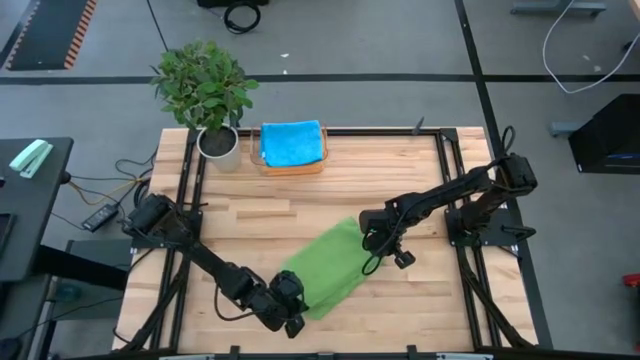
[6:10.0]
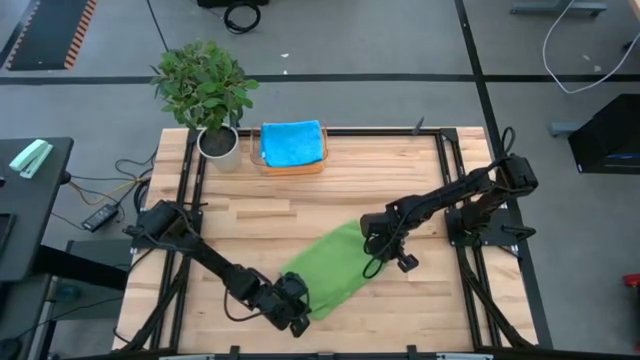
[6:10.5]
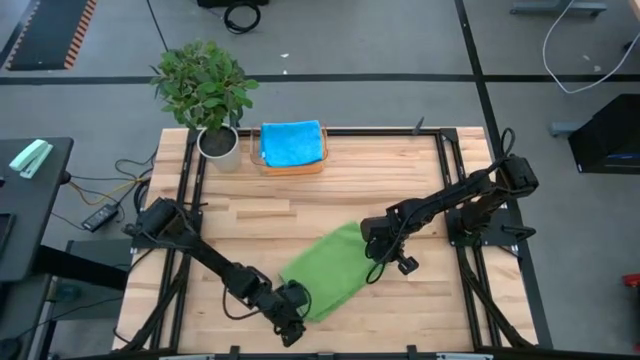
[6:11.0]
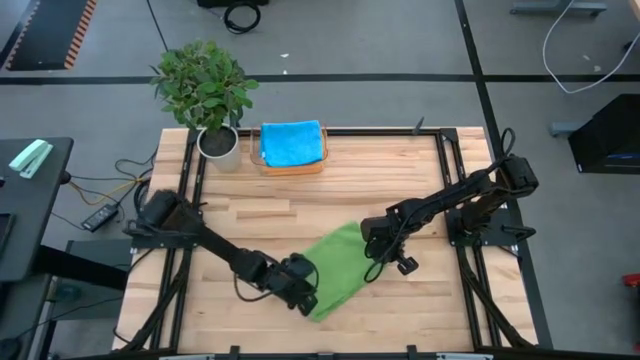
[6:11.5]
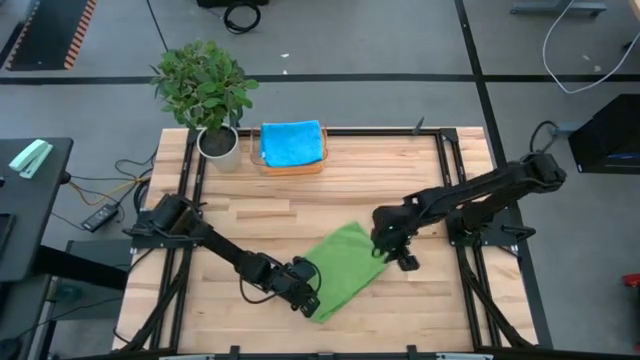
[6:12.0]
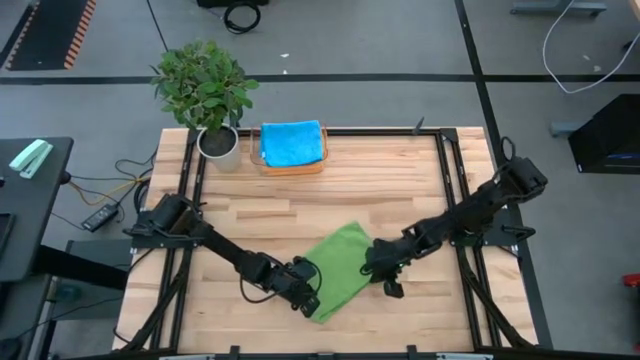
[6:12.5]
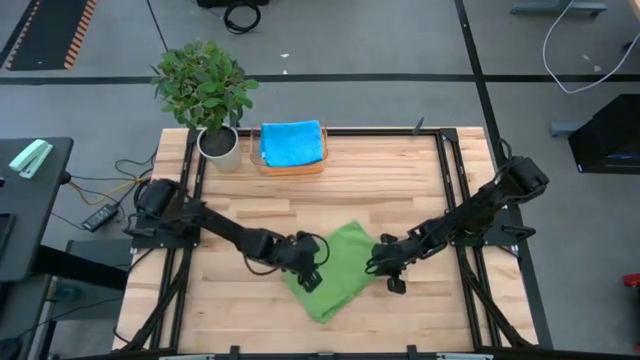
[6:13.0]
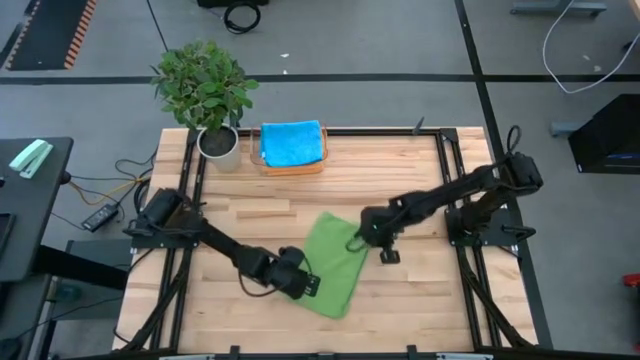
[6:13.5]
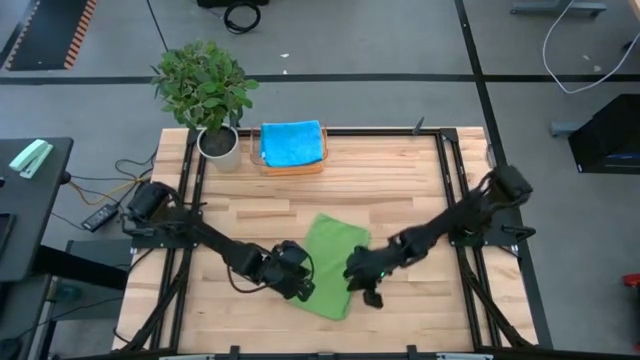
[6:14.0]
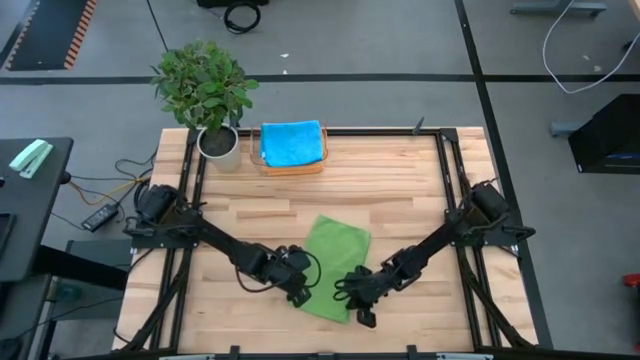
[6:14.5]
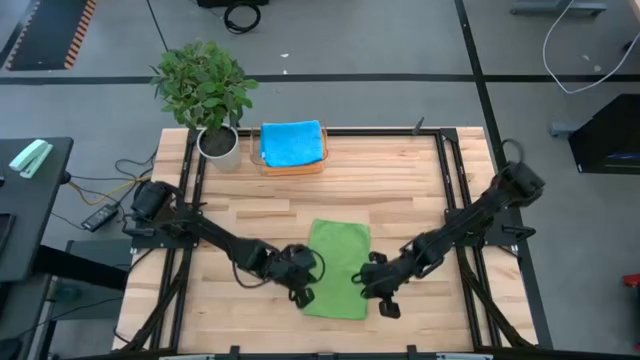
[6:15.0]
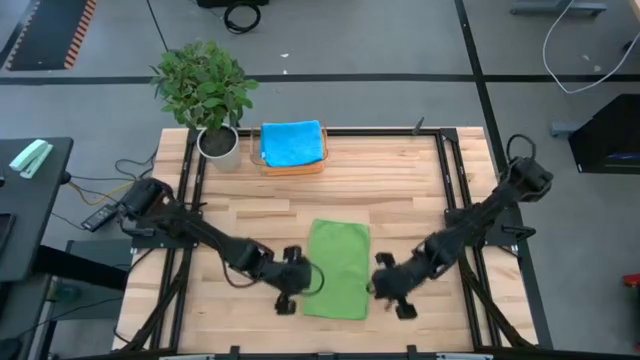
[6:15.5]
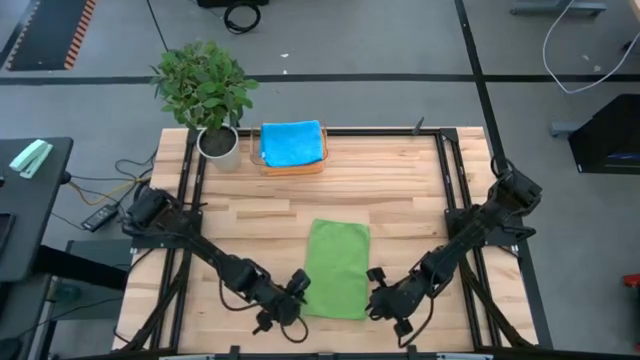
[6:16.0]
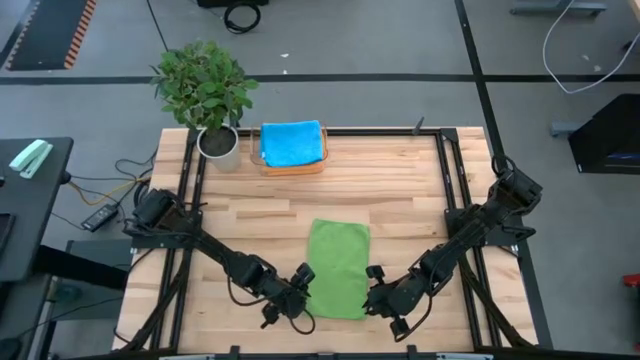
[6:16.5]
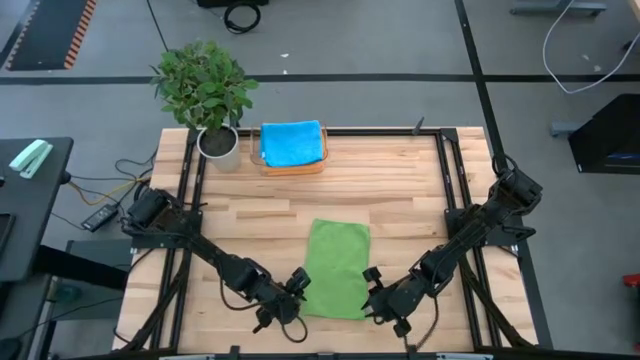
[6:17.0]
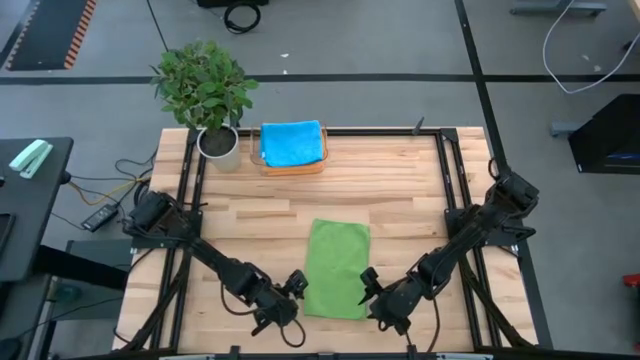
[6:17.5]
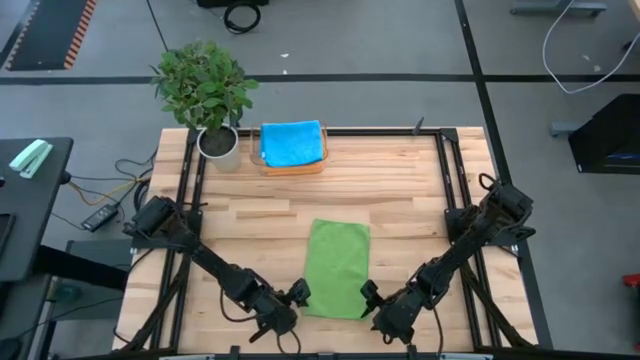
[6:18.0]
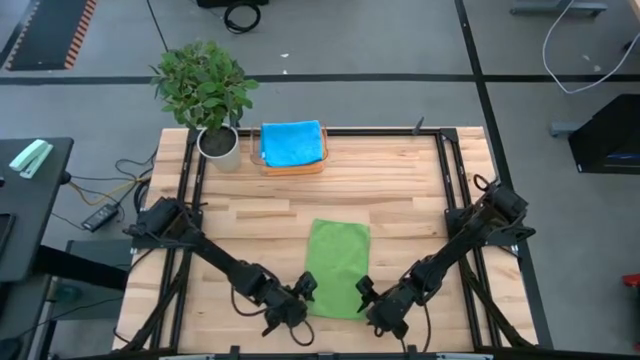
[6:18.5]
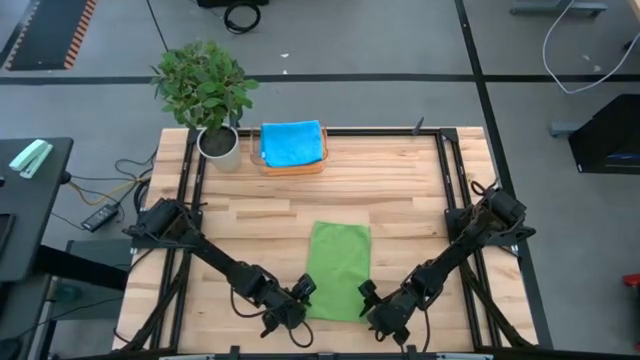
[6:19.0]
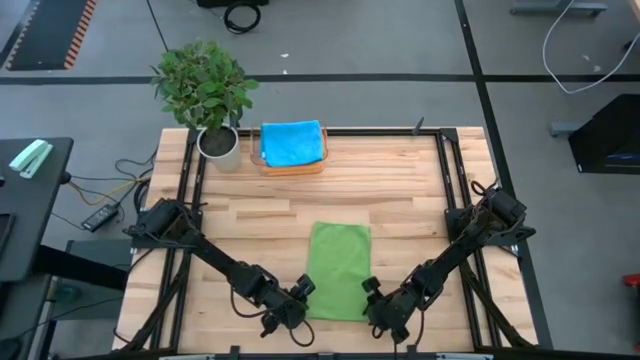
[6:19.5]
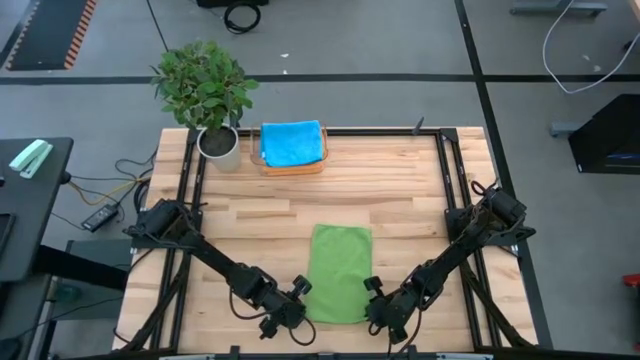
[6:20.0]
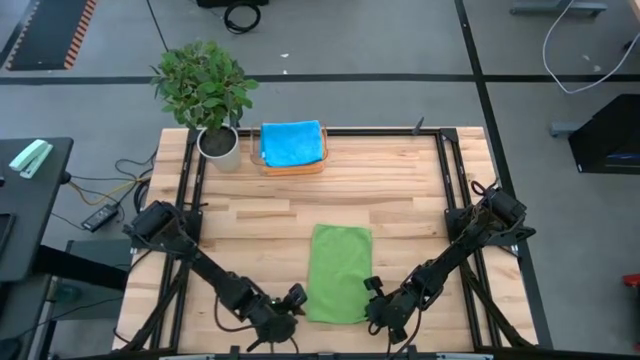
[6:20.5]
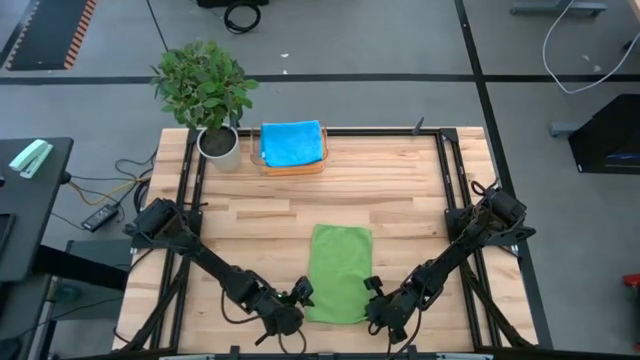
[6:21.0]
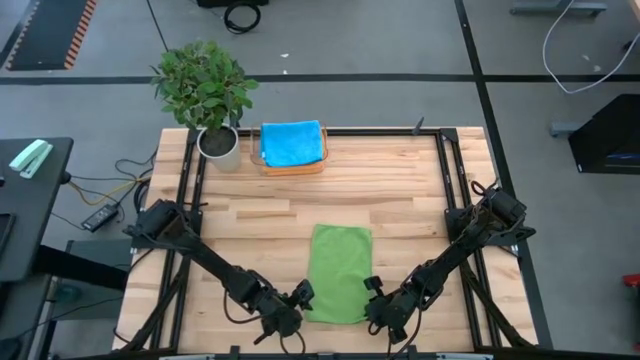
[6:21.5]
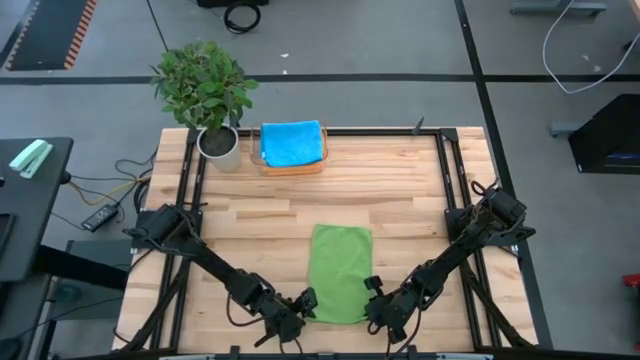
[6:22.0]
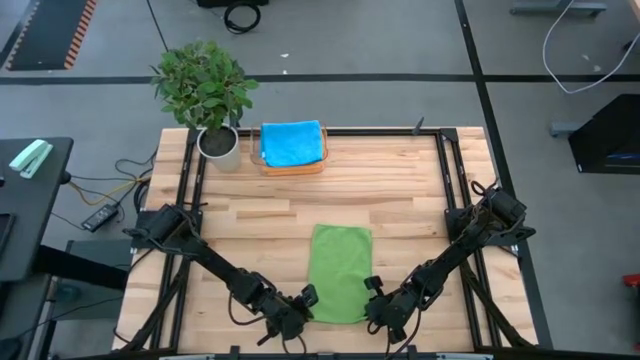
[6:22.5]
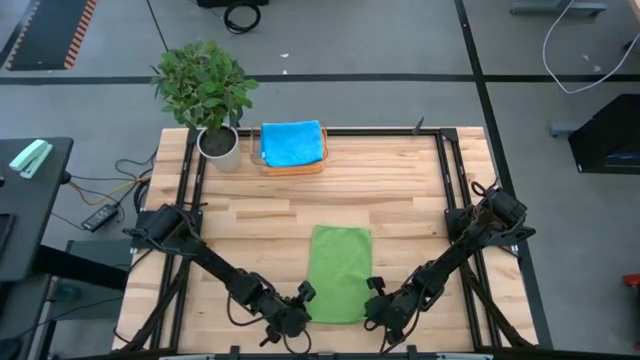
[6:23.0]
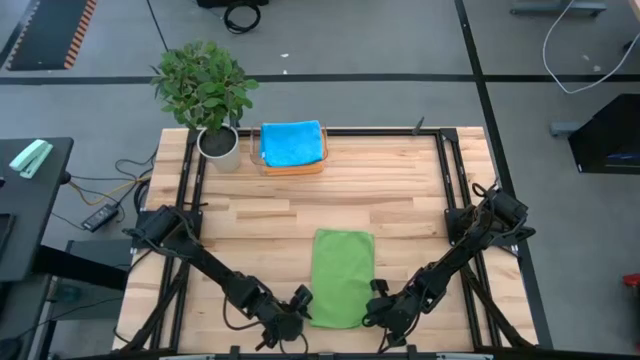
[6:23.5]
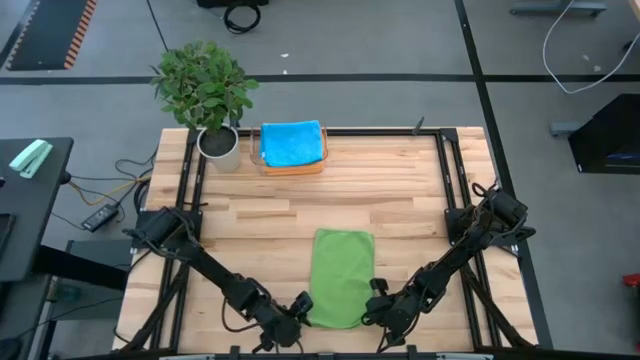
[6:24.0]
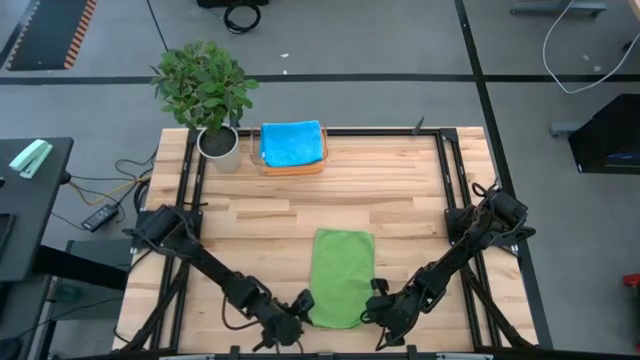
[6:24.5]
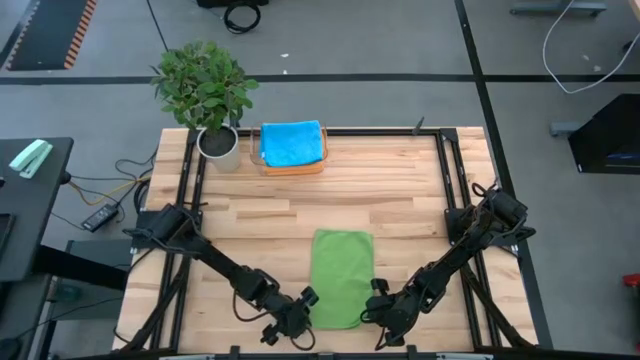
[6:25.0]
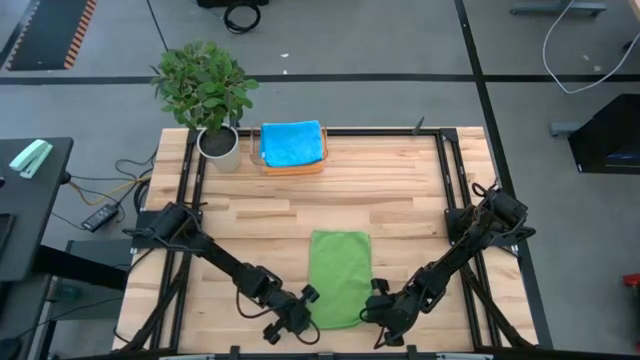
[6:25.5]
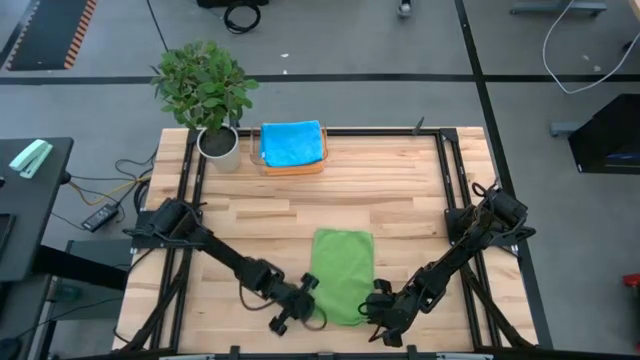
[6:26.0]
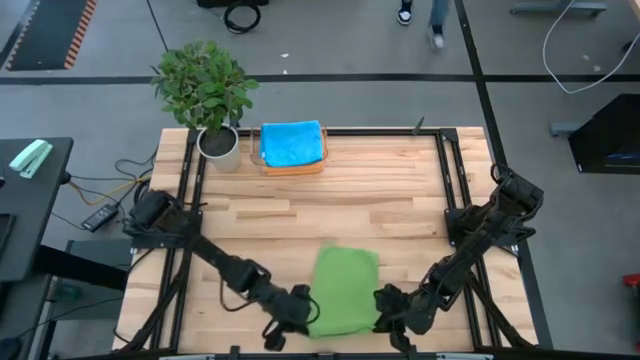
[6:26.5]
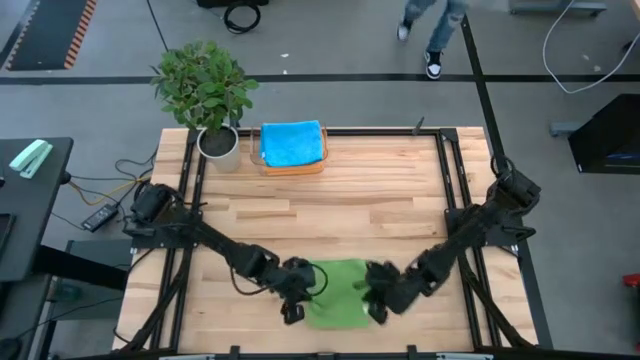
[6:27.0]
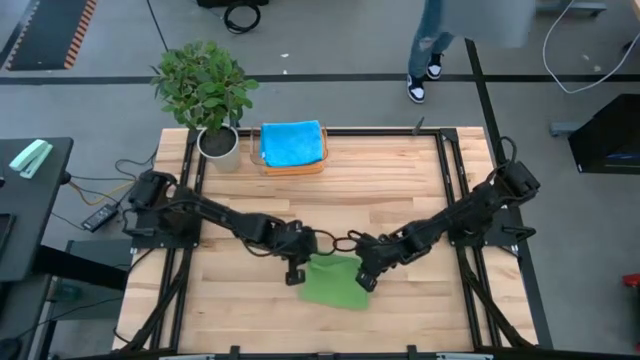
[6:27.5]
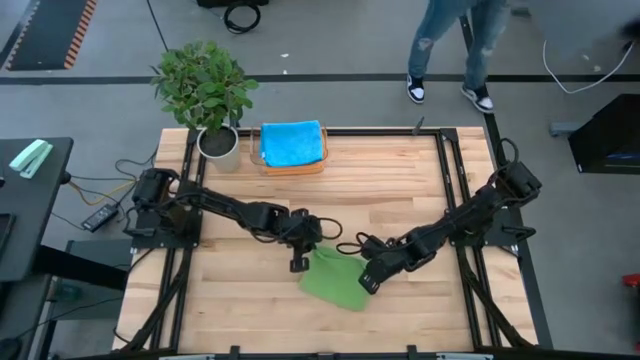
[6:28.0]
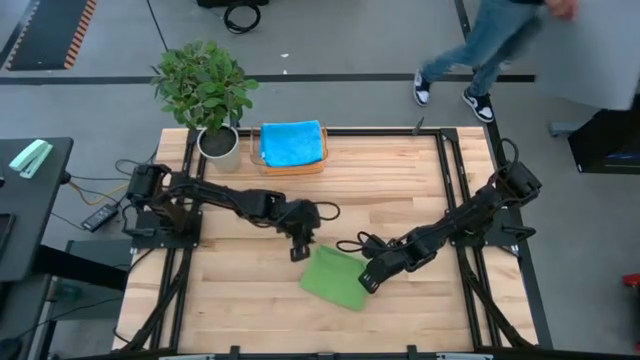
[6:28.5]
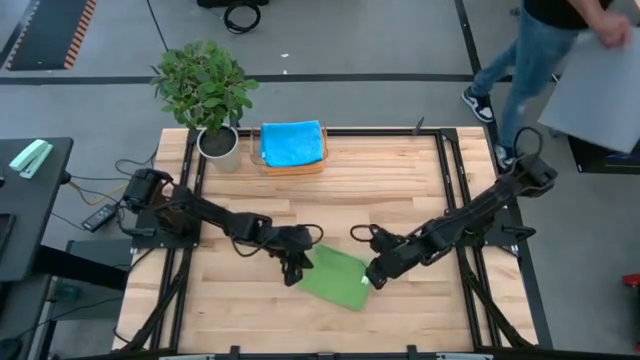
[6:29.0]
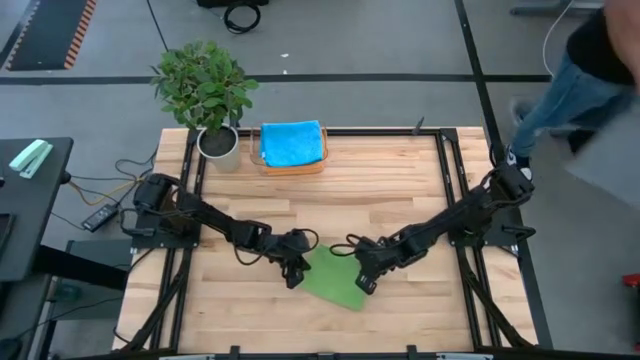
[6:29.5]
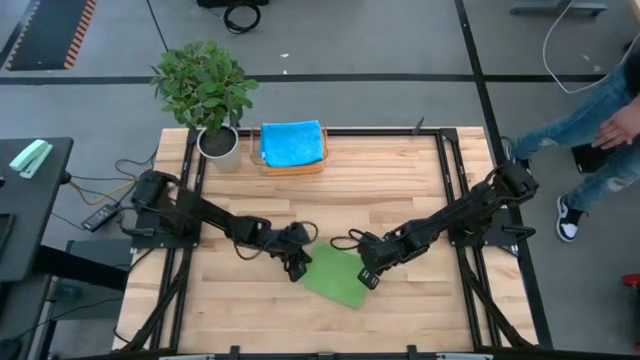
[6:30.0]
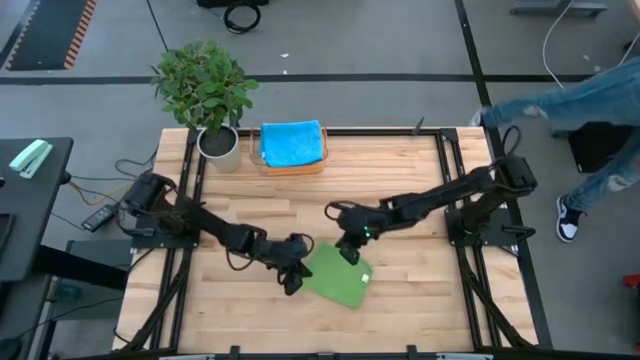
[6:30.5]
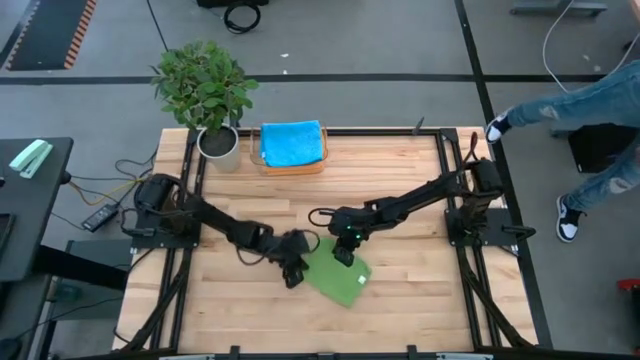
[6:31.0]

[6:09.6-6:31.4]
Task: Fold microfiber towels
Fold the green microfiber cloth

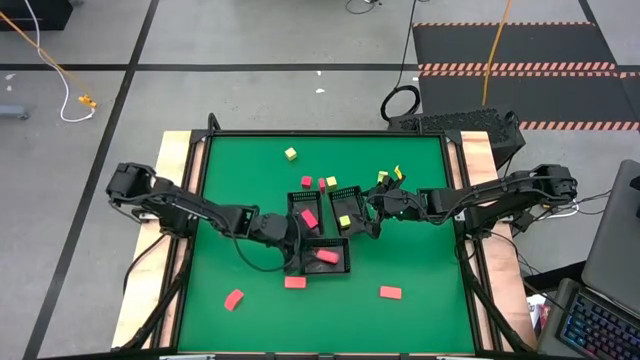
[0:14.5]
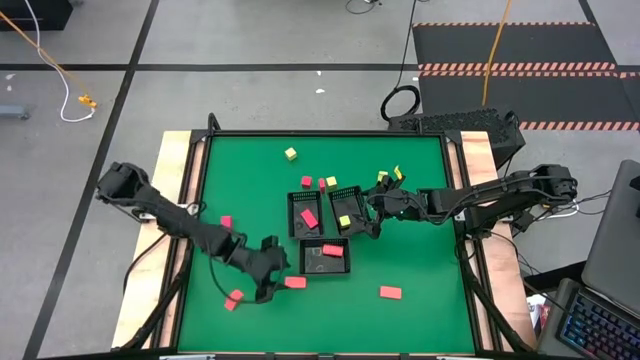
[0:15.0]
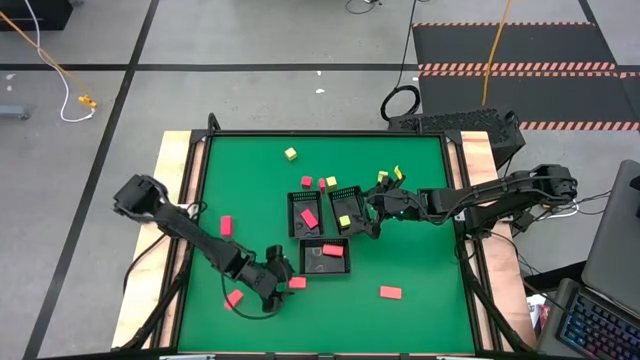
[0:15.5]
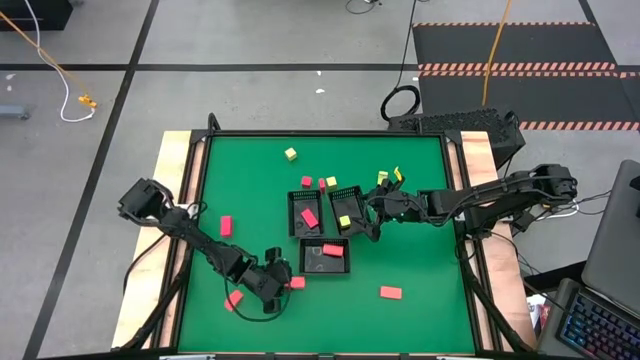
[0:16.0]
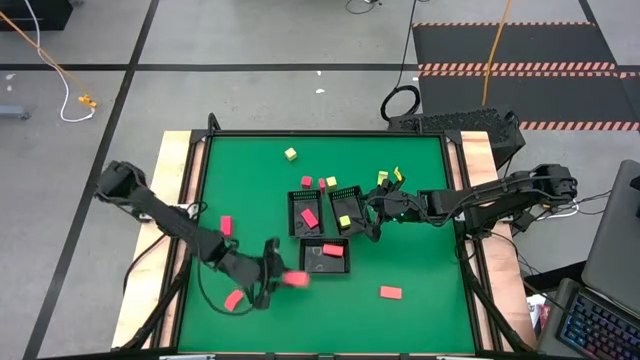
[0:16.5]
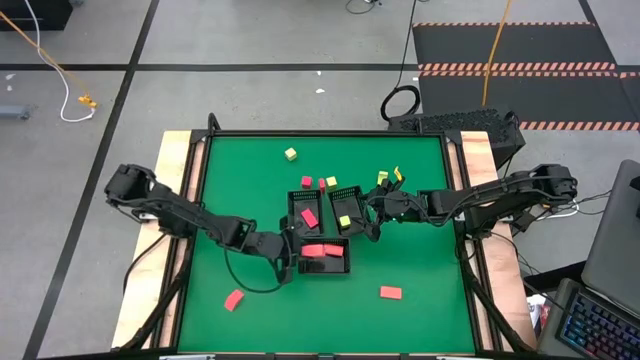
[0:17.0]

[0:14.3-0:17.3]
Task: Sort & place blocks by color
Put the orange block into the bottom black bin
